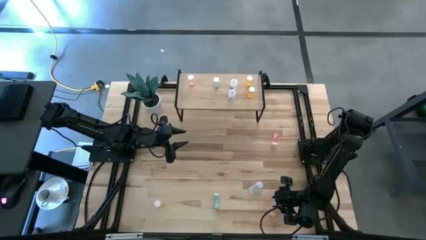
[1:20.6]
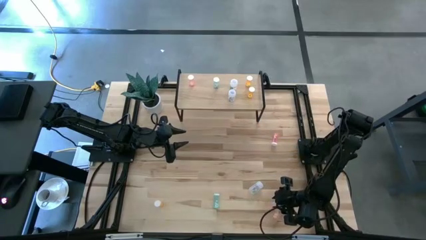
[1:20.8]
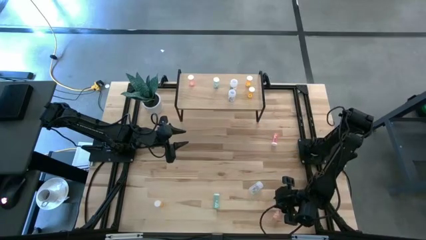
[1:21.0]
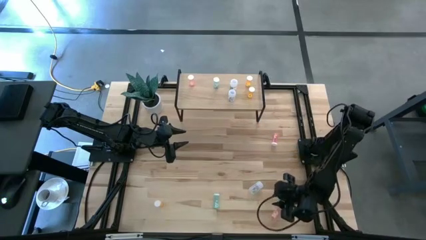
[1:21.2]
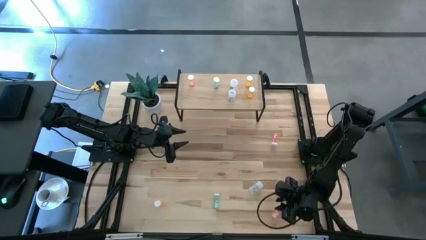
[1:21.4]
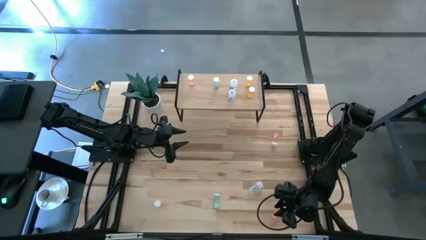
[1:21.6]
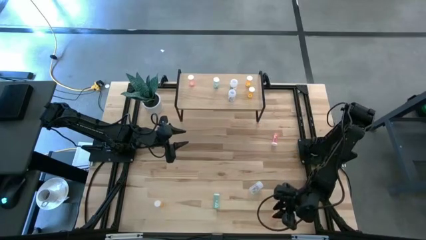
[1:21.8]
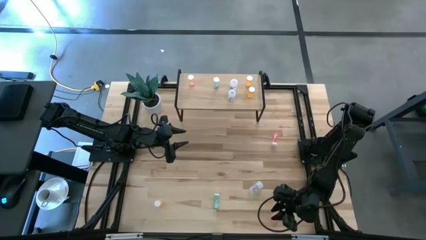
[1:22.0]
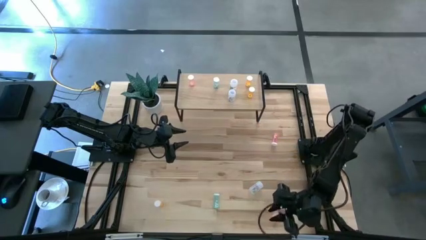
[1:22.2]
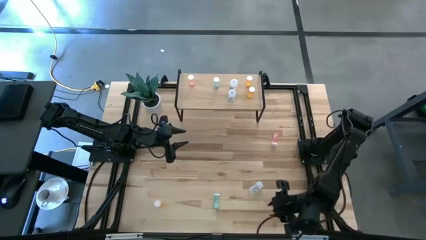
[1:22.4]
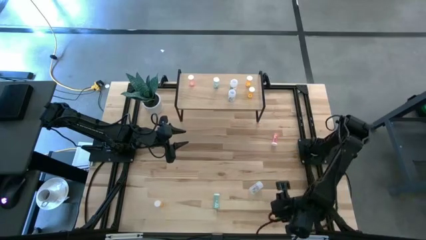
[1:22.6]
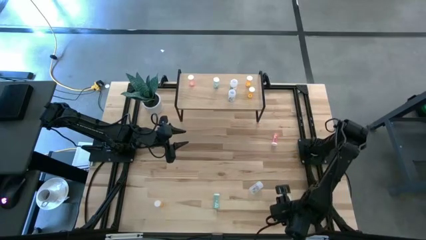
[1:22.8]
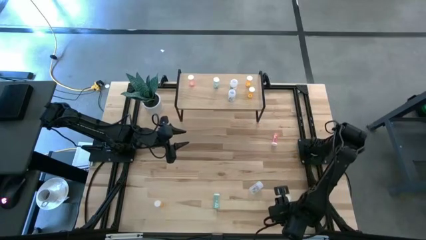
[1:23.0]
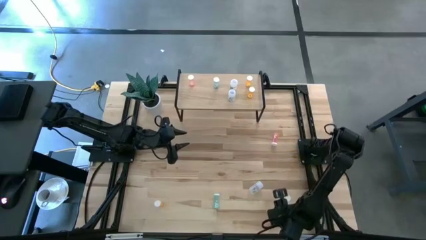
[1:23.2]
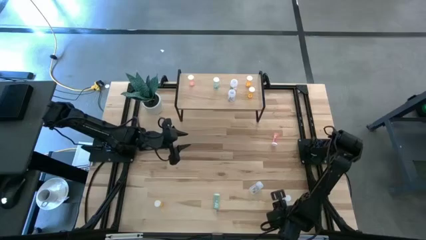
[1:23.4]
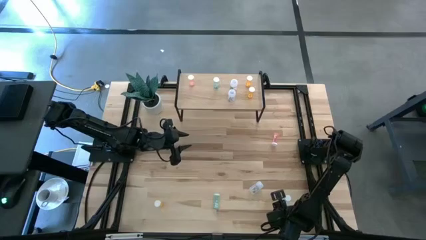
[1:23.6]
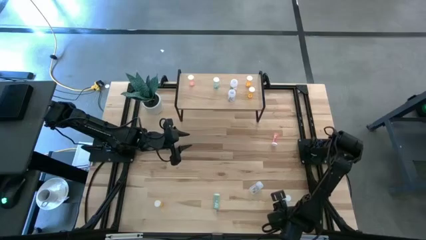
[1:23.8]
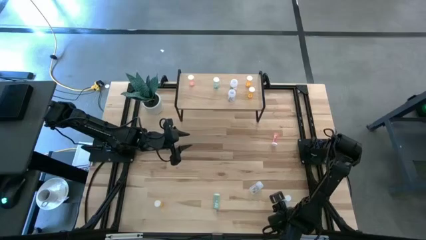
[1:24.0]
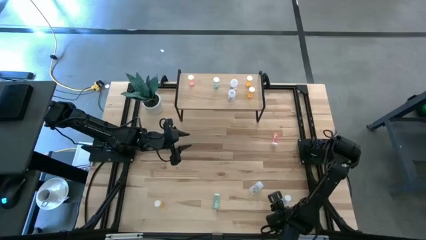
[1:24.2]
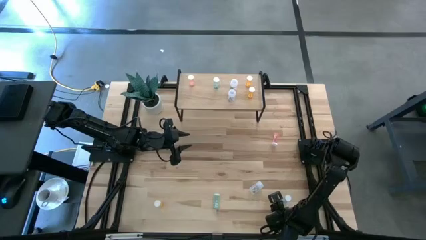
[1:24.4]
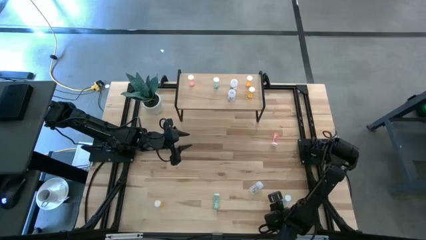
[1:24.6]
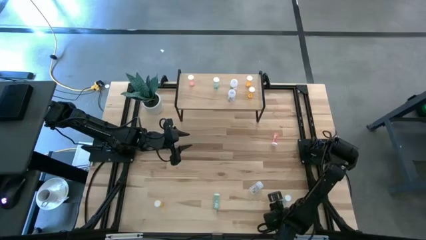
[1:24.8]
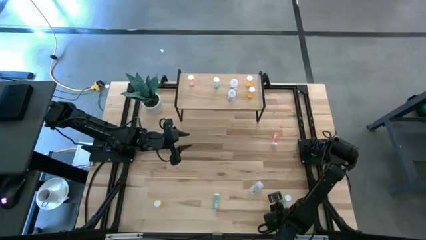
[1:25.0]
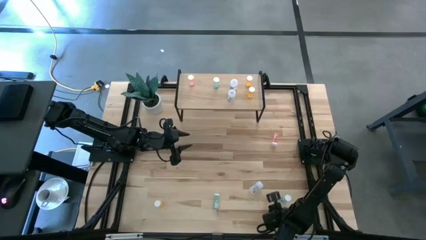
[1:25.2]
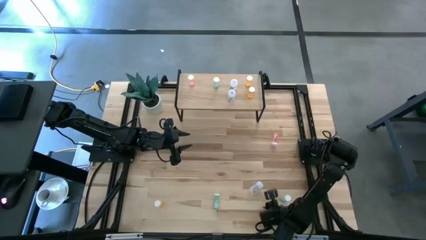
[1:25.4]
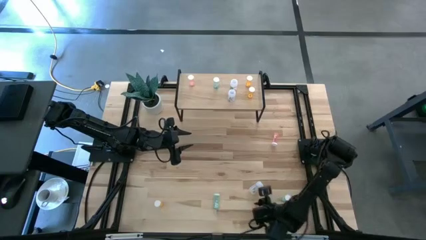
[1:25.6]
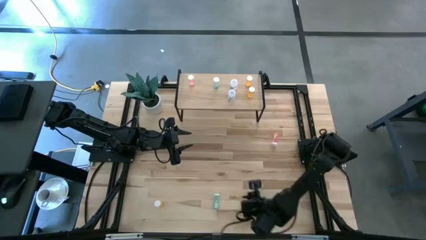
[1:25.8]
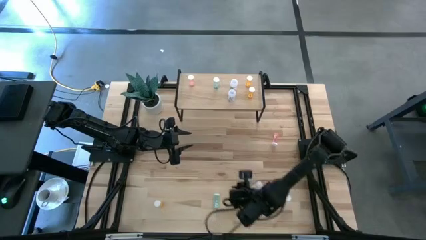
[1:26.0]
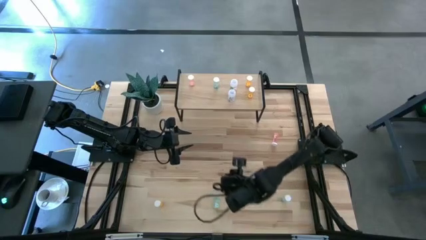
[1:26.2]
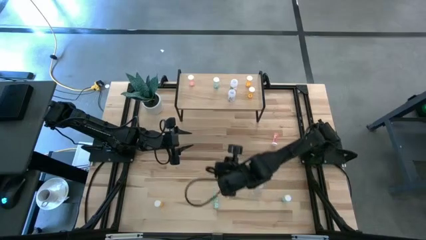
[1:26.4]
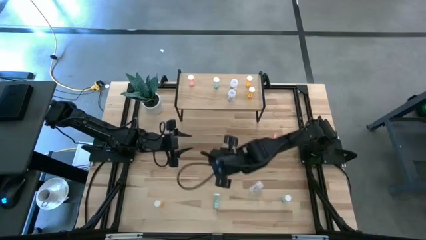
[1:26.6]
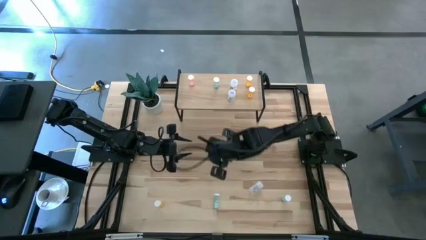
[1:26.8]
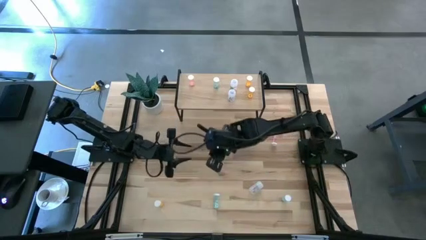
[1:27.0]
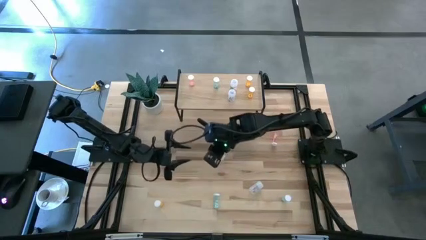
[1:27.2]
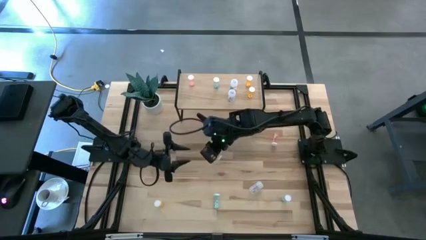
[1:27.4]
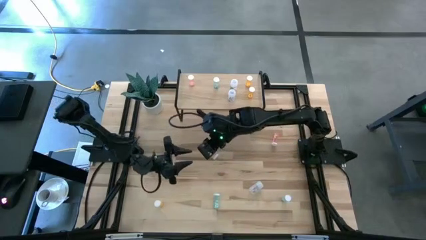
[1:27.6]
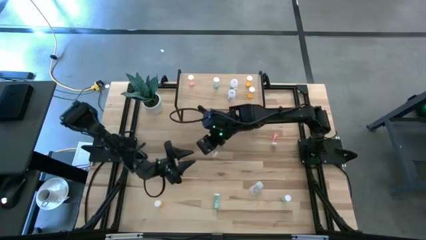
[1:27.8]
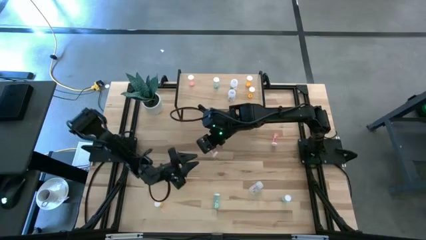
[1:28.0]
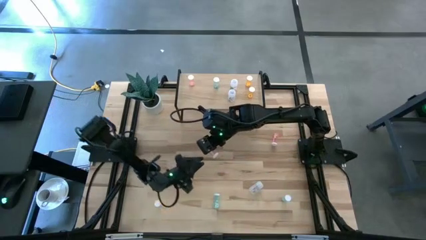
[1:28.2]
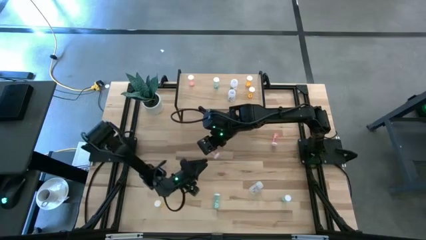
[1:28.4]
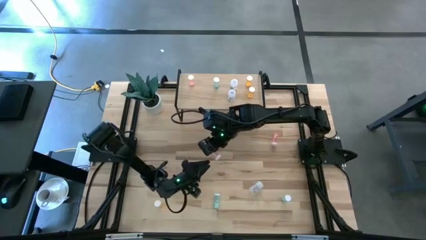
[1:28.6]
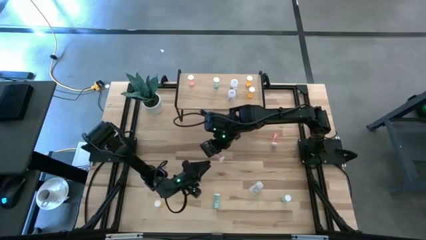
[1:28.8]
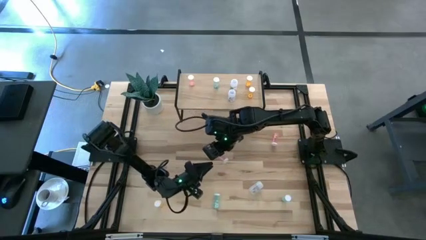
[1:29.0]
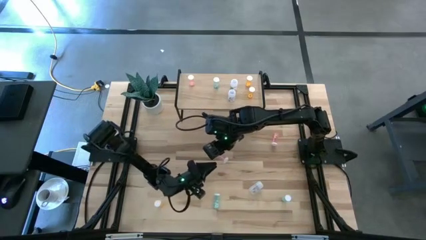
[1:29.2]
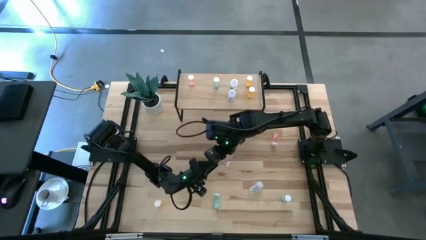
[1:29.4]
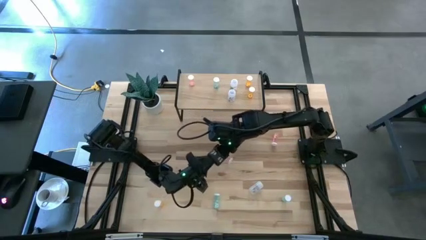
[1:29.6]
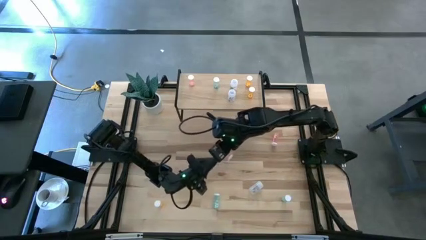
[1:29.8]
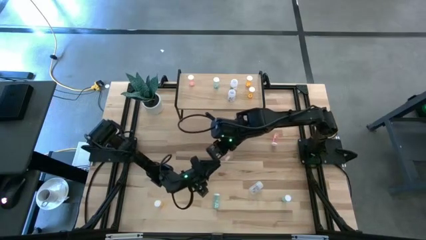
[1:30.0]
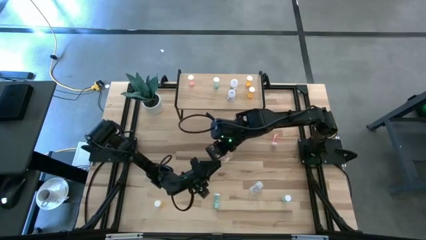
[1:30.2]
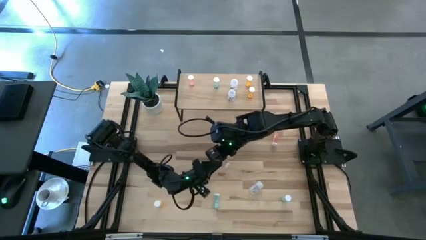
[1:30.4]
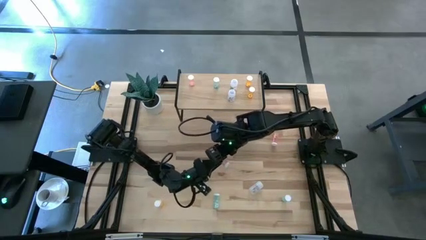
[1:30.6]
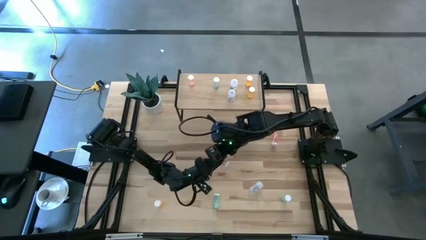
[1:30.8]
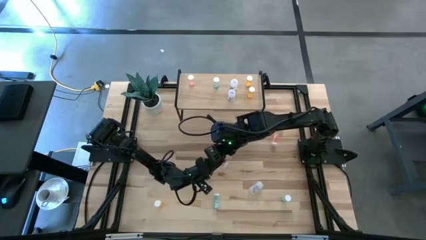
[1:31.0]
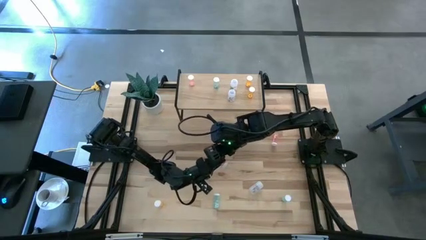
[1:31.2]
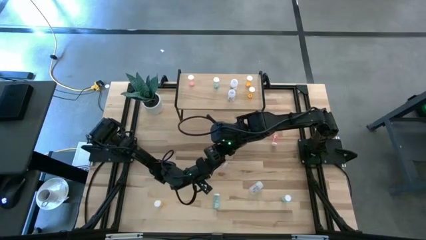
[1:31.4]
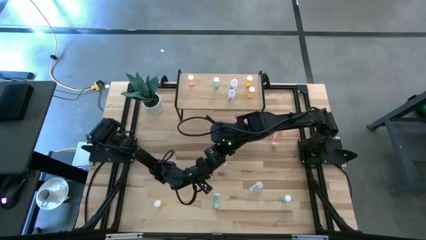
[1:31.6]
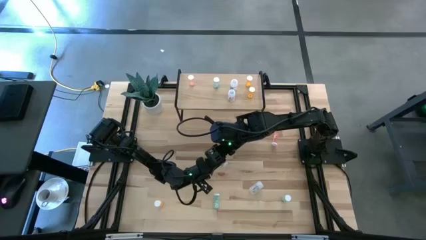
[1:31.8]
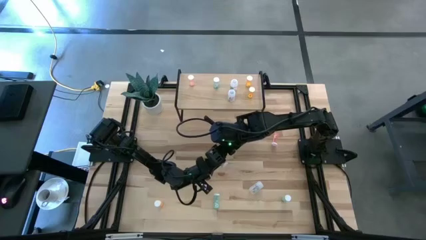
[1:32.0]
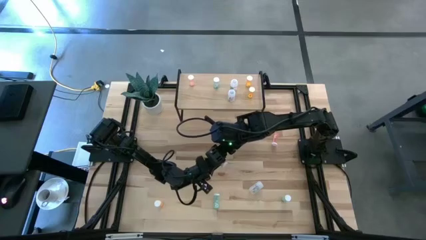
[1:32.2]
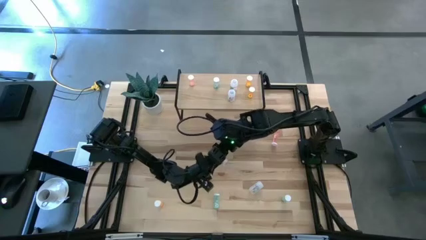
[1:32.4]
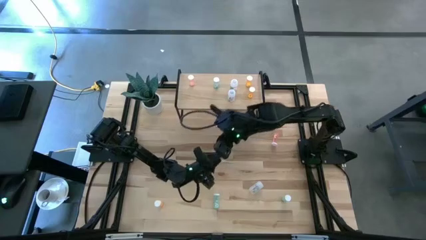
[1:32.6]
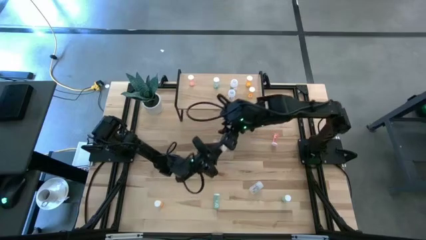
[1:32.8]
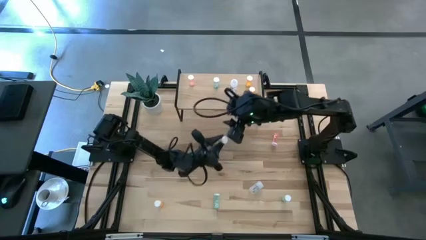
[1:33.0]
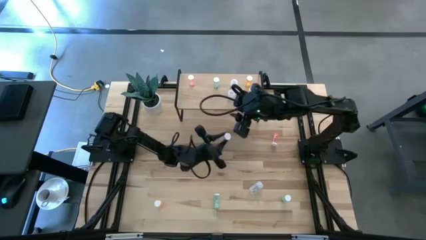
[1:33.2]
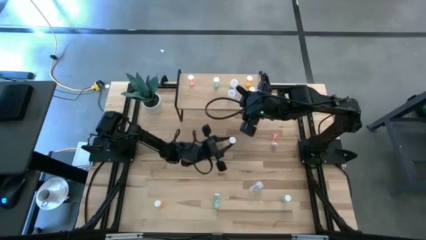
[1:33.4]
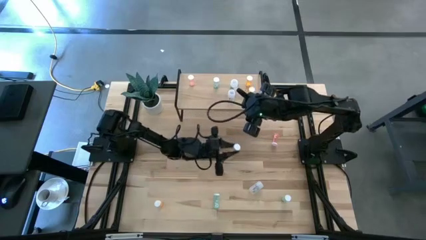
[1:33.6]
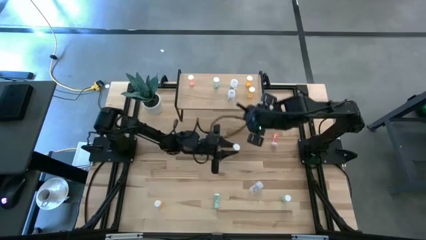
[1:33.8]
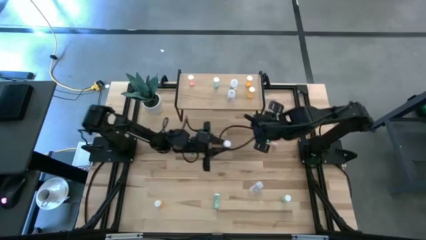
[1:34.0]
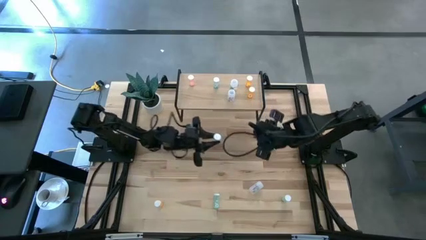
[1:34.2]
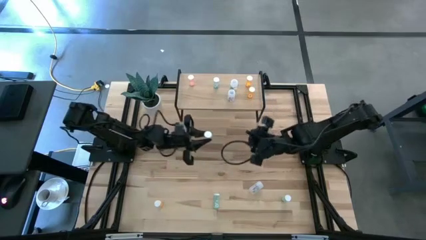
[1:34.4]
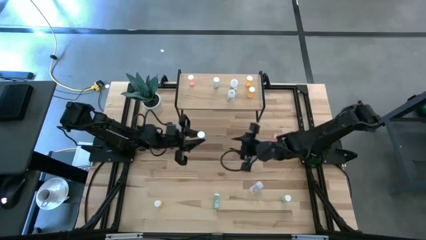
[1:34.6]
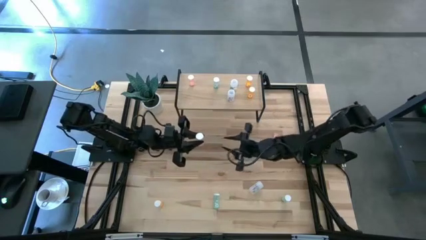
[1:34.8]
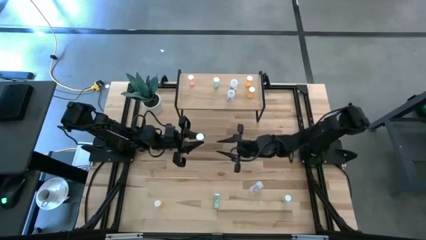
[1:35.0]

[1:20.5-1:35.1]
Task: Pick and place medicine bottles onto shelf by color
Put the bottom pink pill bottle aligned with the other pink pill bottle on the shelf
